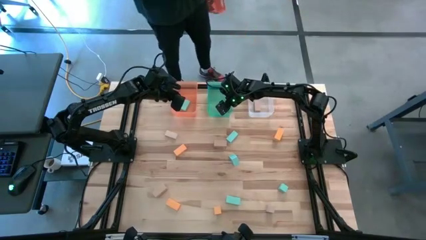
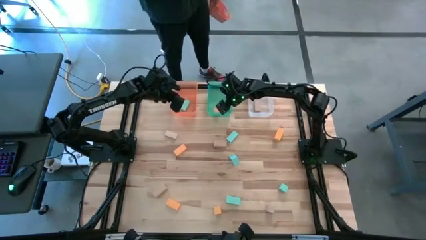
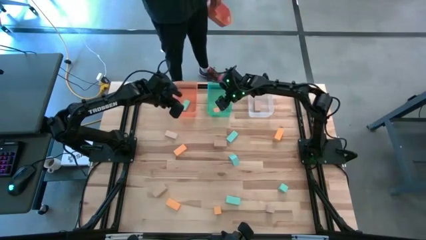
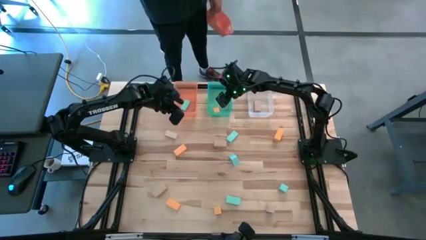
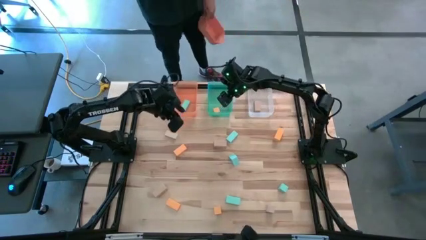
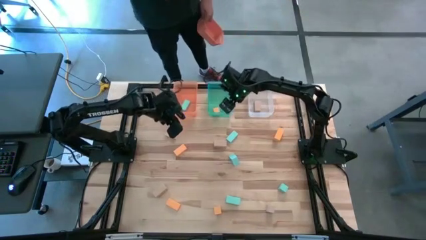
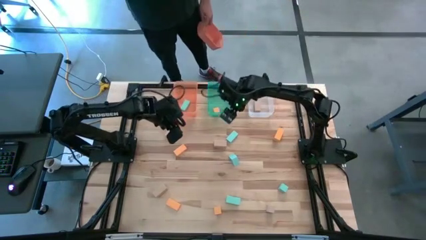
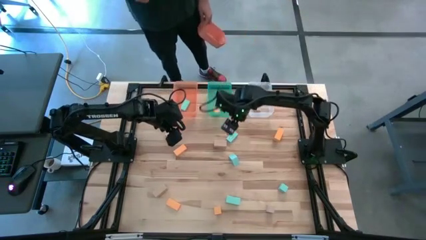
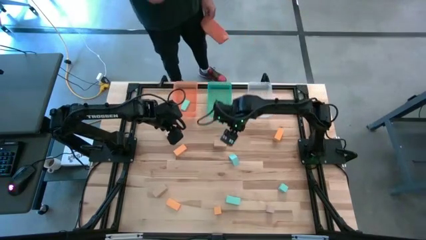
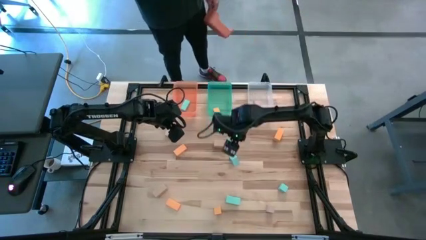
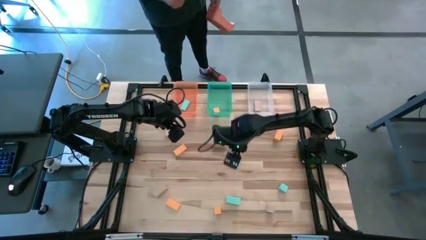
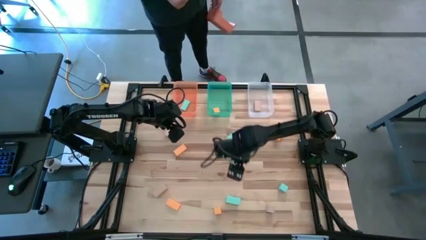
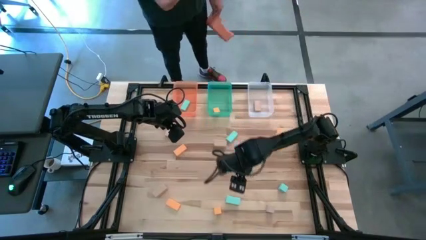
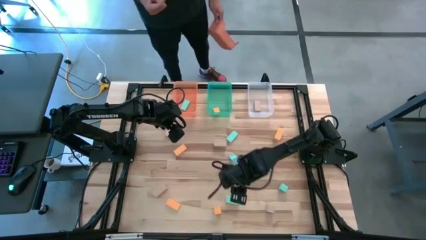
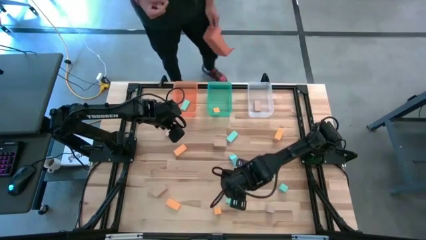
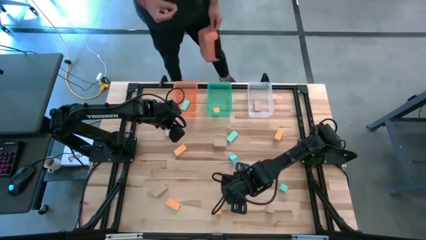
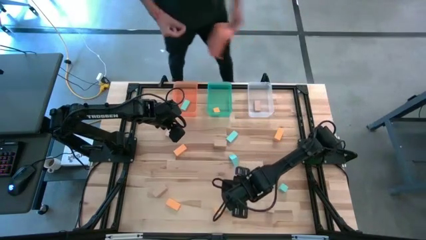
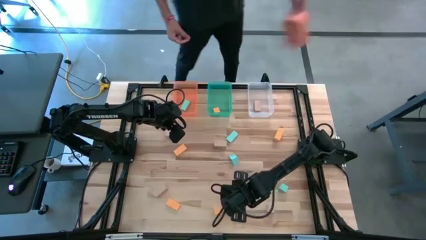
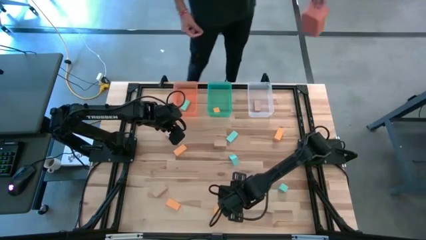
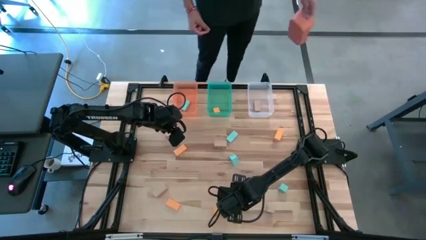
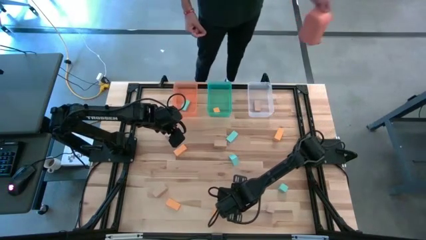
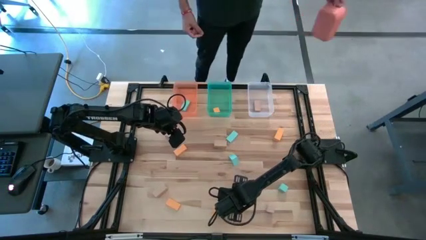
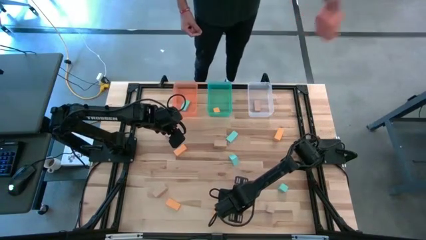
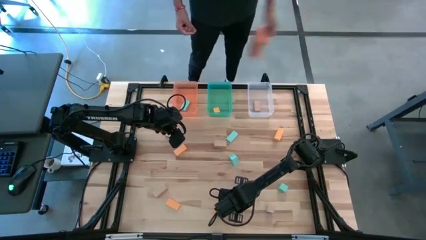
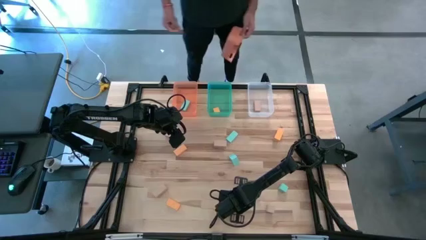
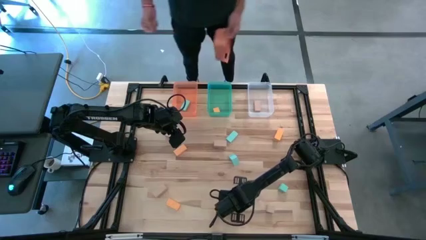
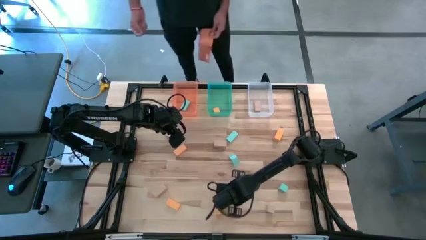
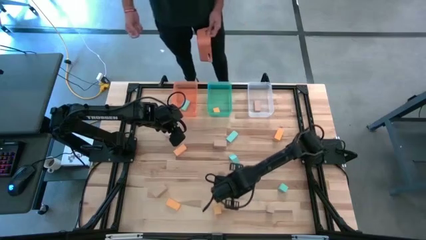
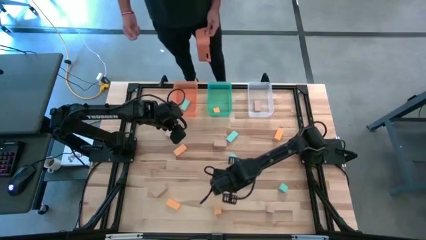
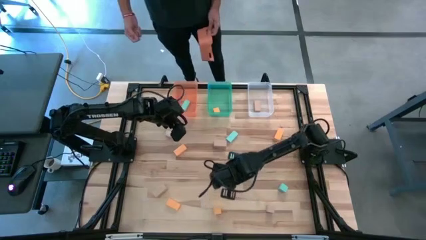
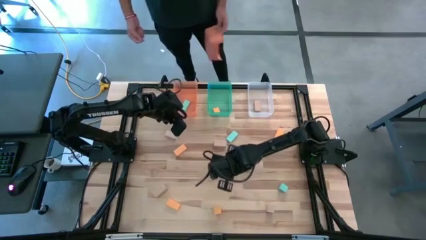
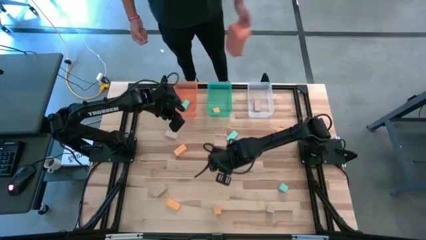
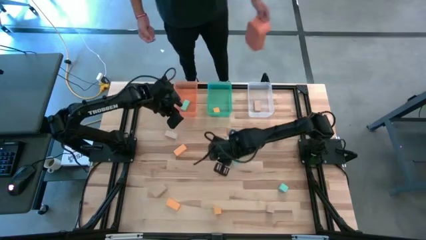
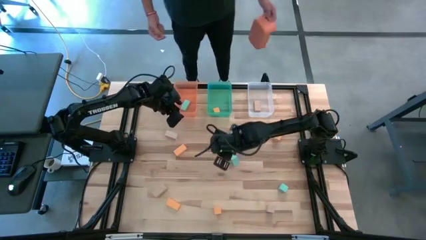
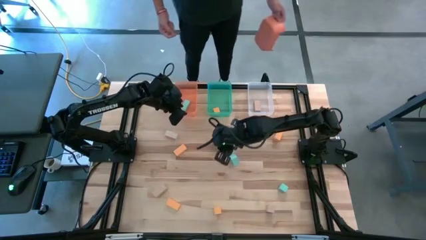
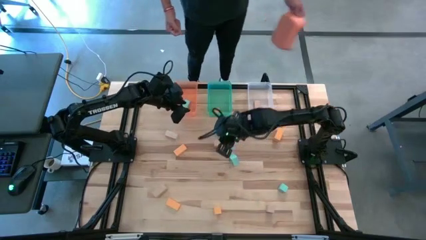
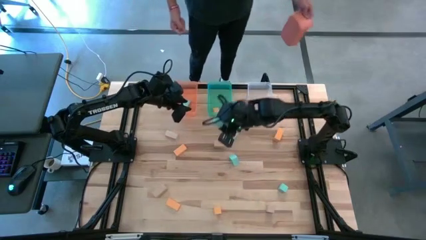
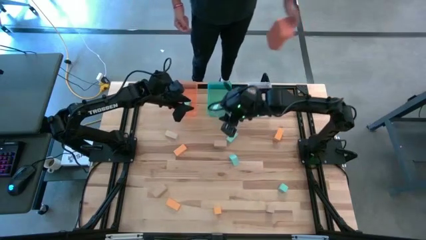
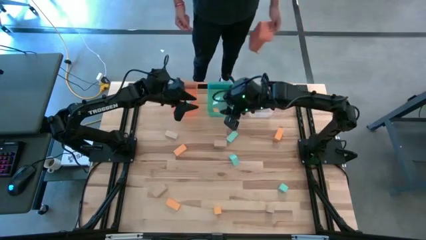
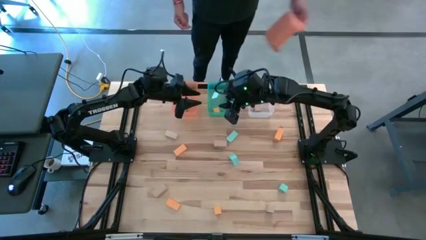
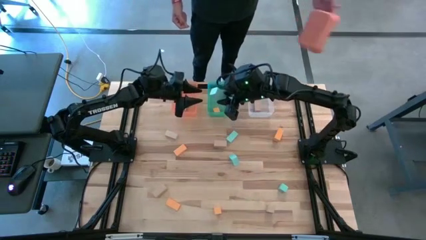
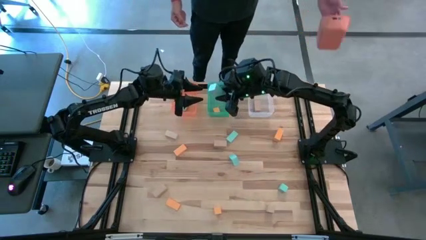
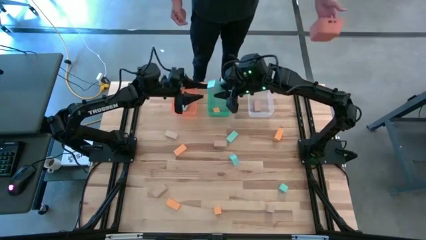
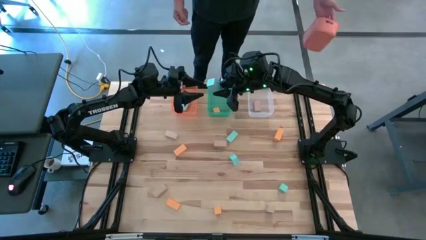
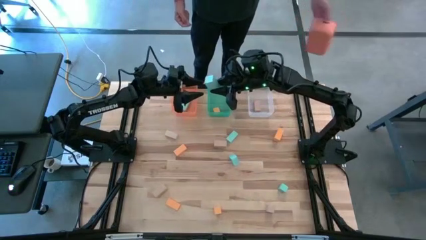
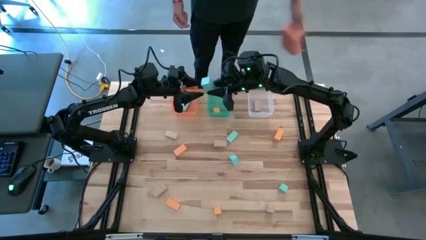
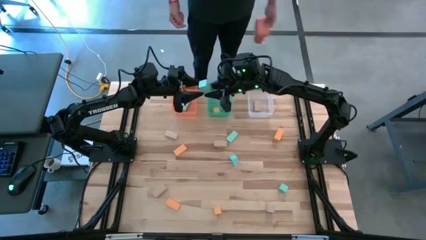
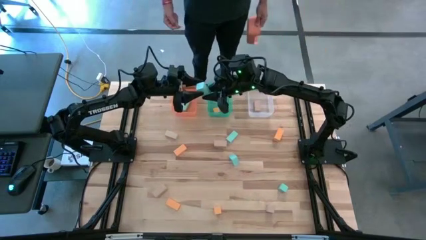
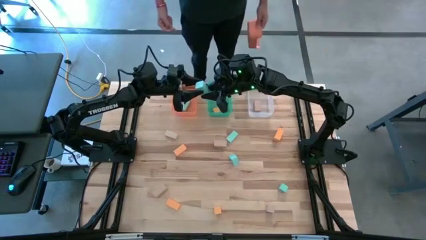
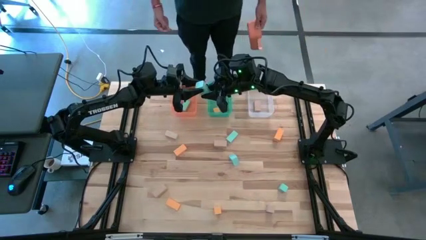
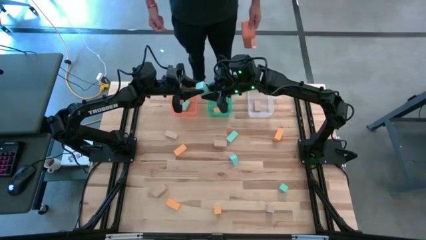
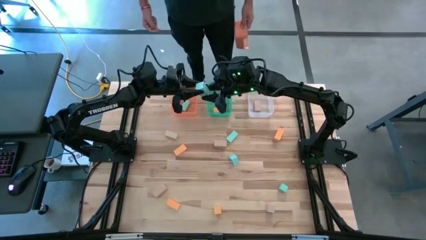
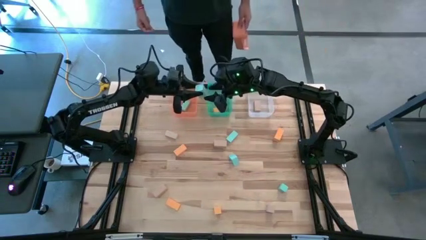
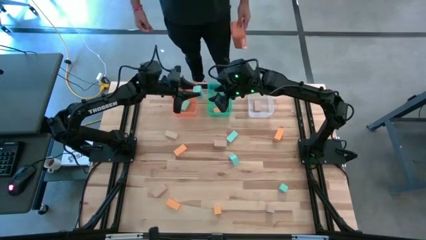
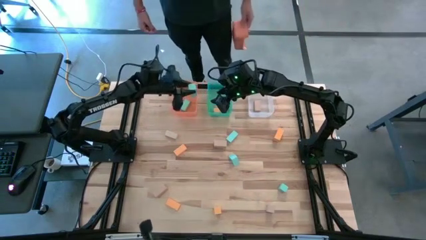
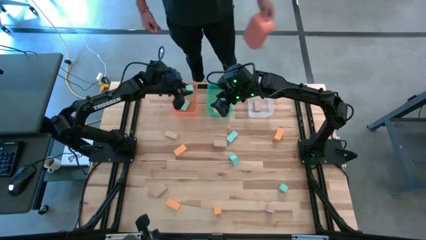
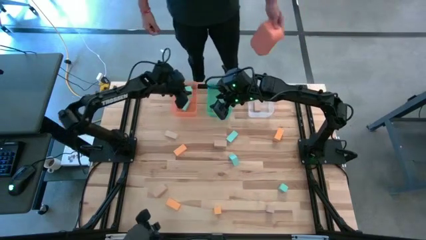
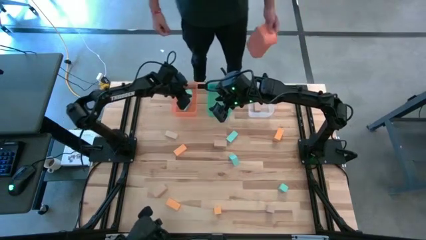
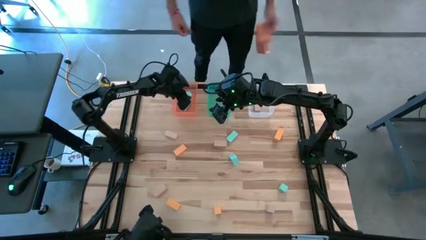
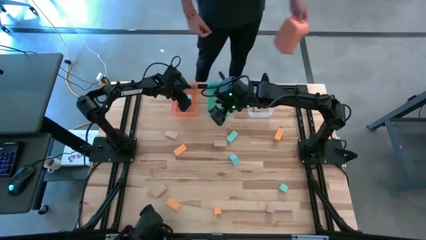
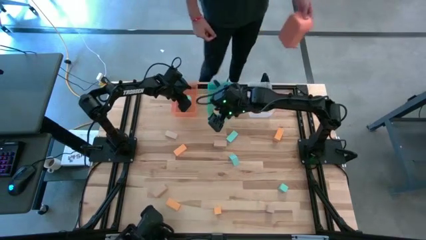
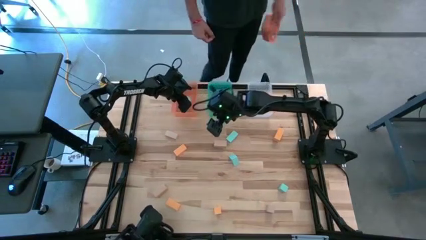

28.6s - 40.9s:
Task: Sort & place blocks by color
Put the light blue block into the orange bin

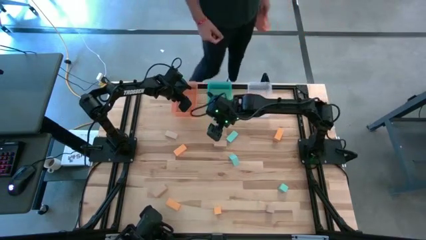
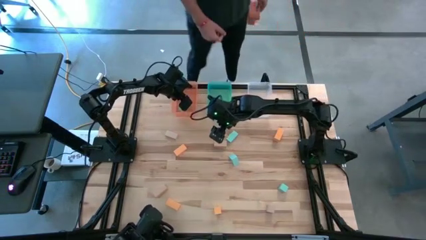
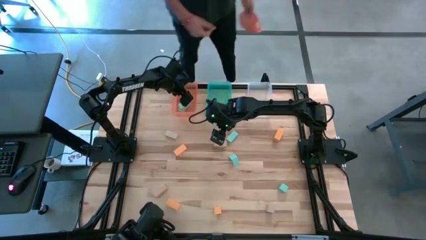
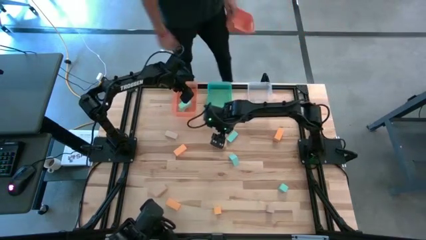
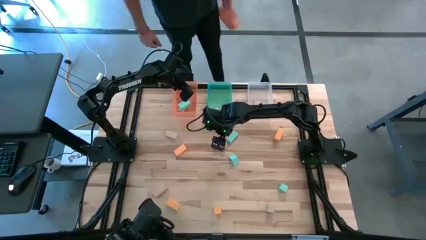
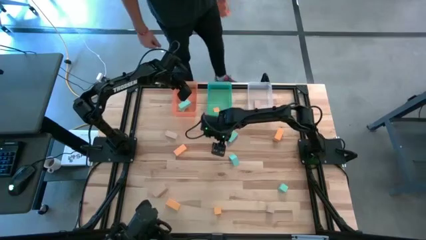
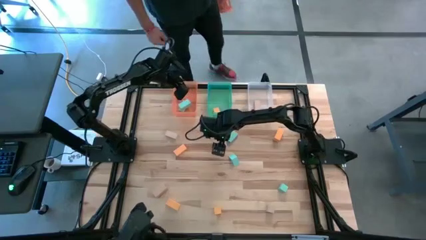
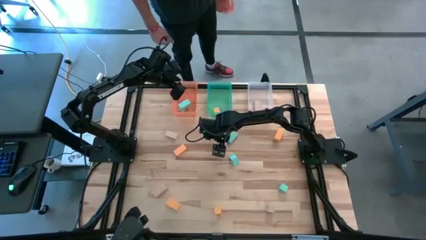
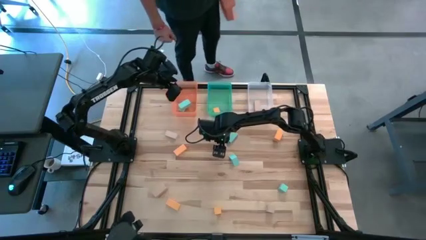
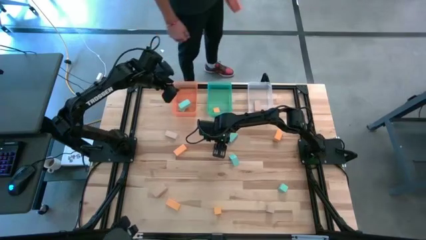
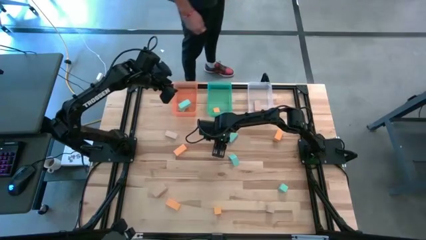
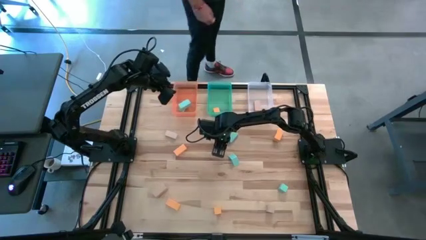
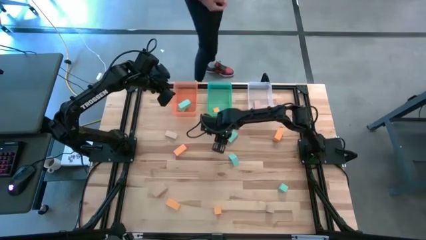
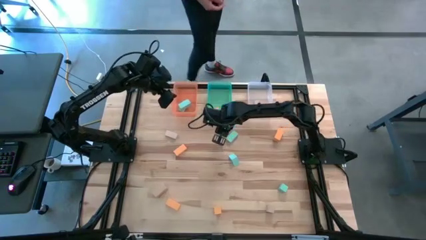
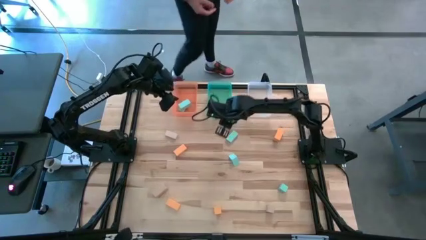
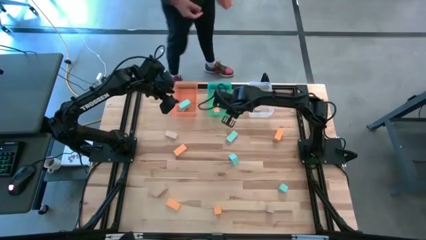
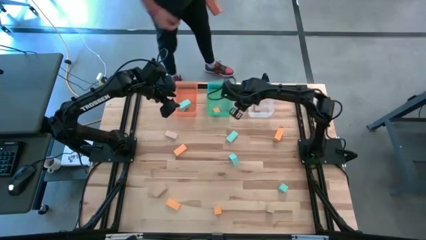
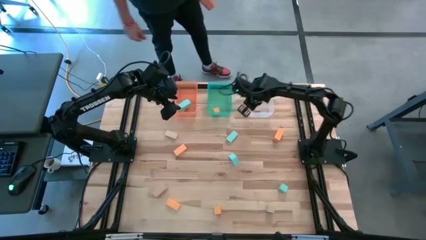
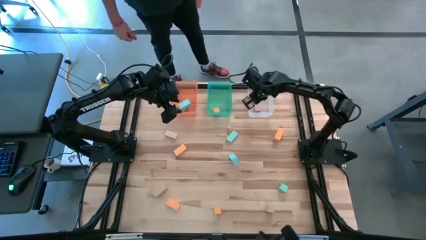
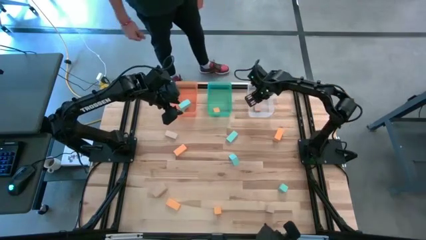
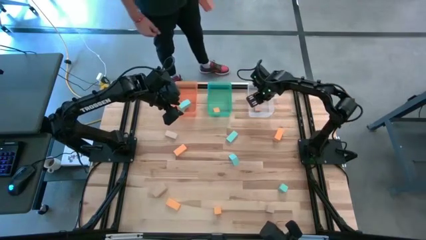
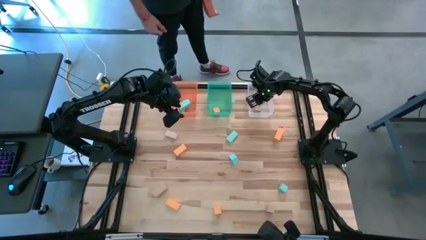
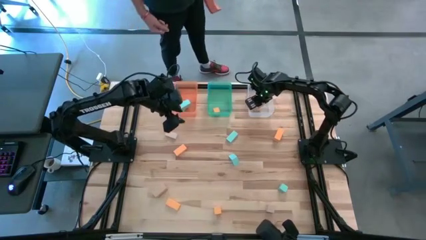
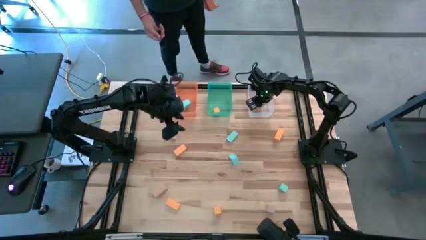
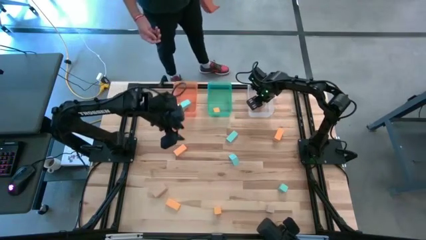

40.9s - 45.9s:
Put the brown block into the transparent bin
